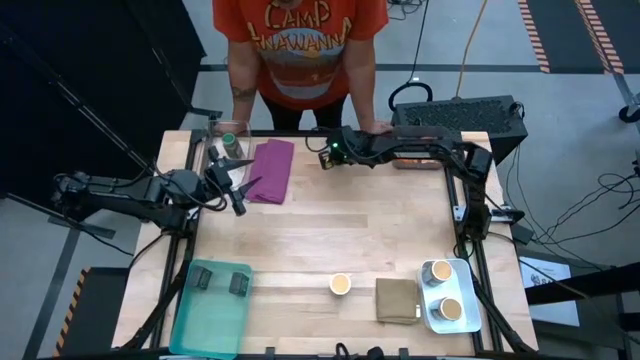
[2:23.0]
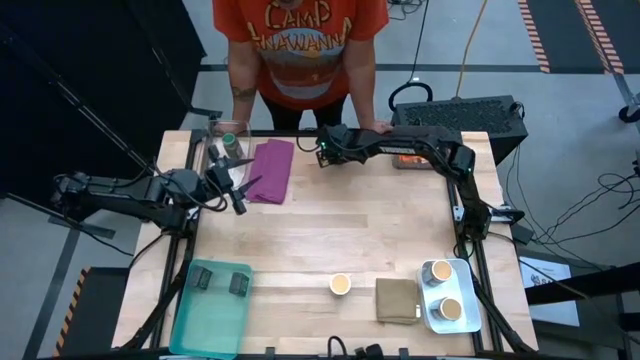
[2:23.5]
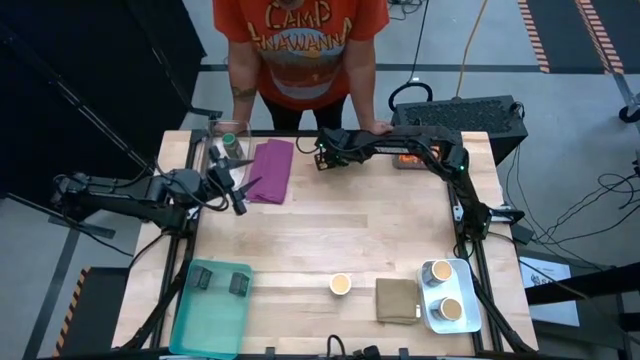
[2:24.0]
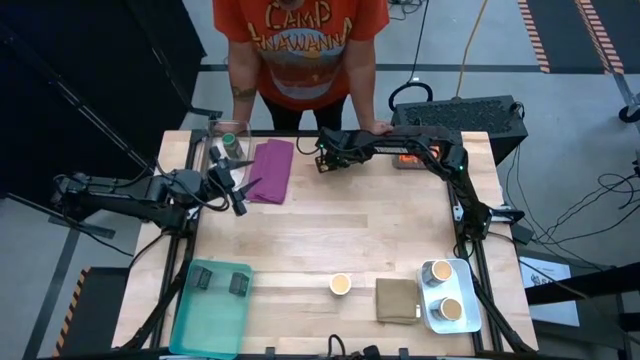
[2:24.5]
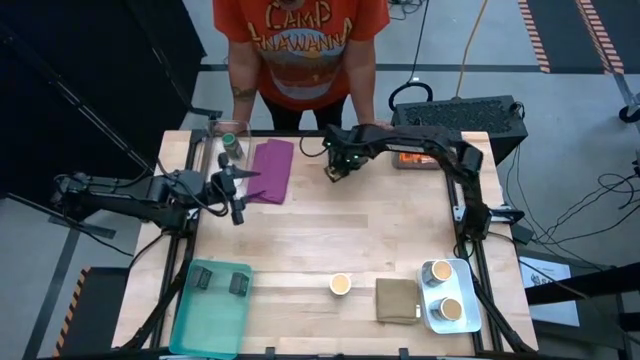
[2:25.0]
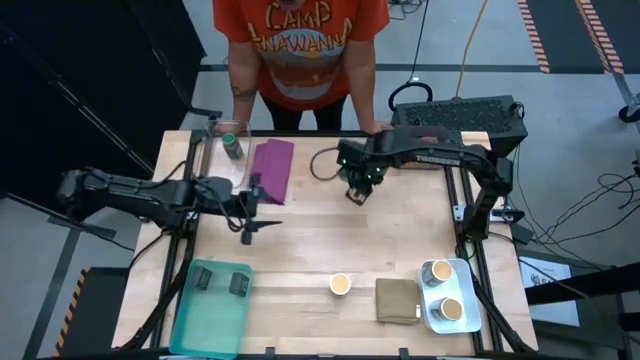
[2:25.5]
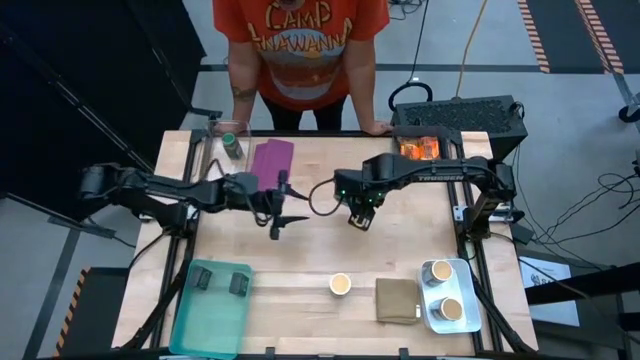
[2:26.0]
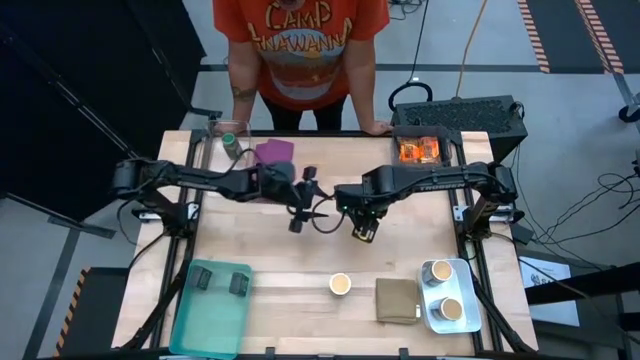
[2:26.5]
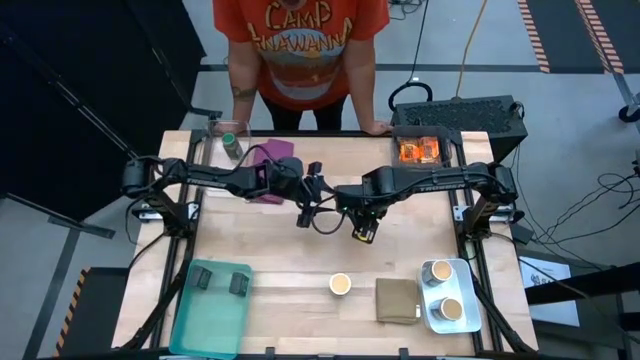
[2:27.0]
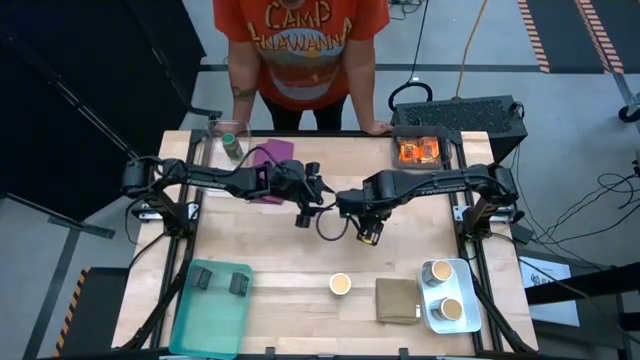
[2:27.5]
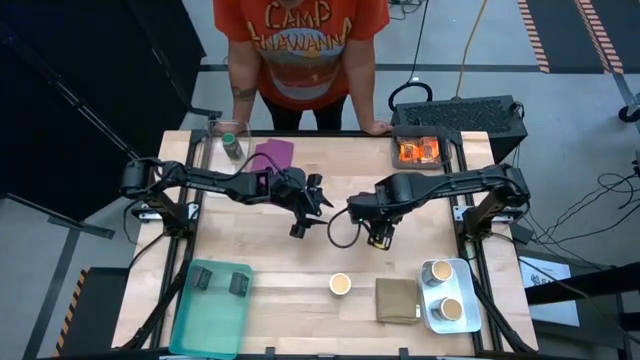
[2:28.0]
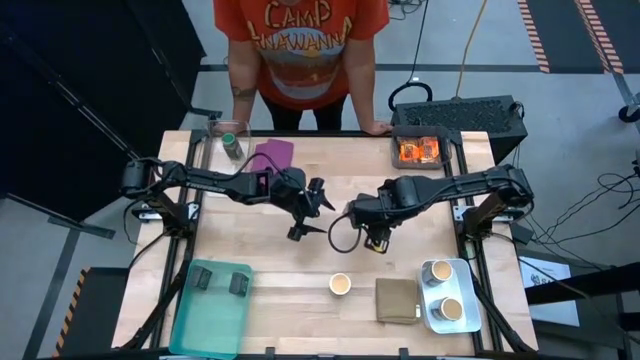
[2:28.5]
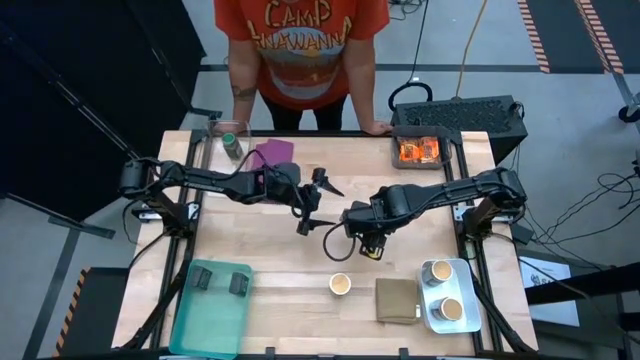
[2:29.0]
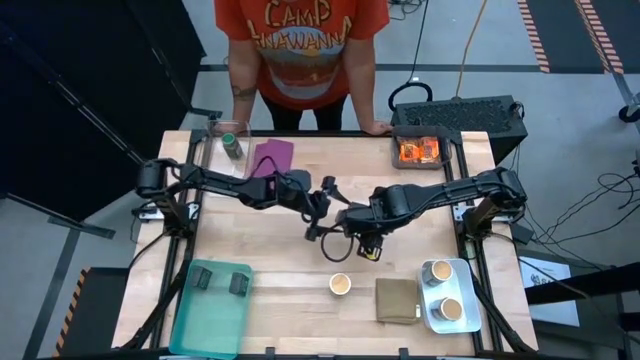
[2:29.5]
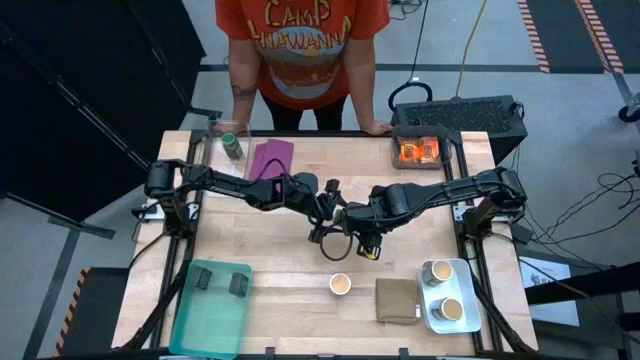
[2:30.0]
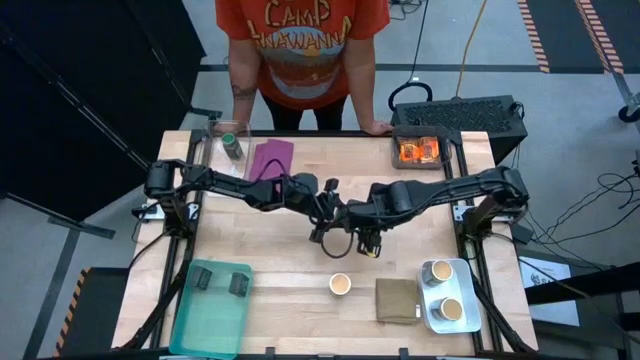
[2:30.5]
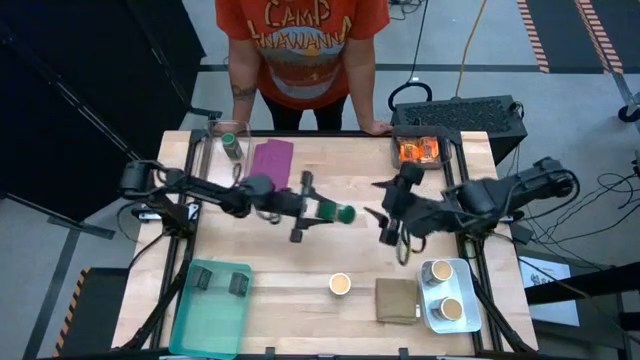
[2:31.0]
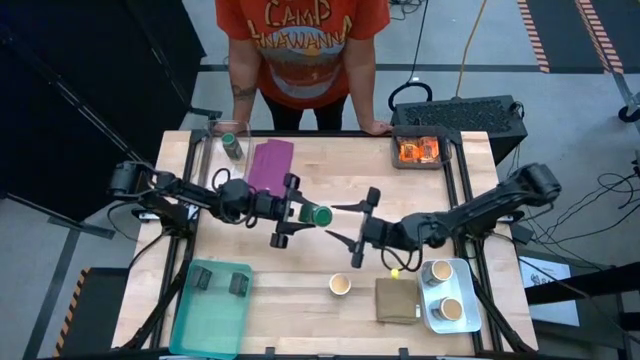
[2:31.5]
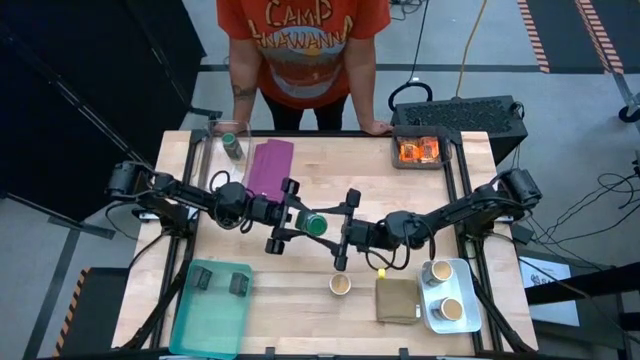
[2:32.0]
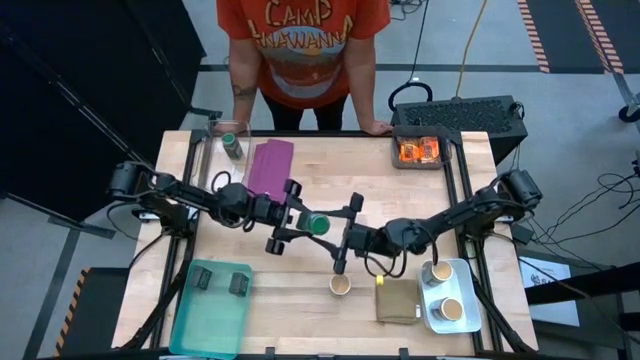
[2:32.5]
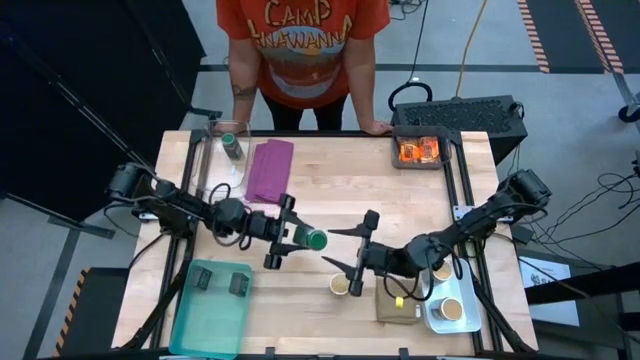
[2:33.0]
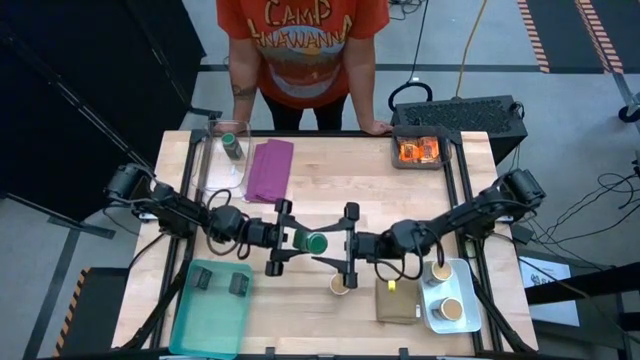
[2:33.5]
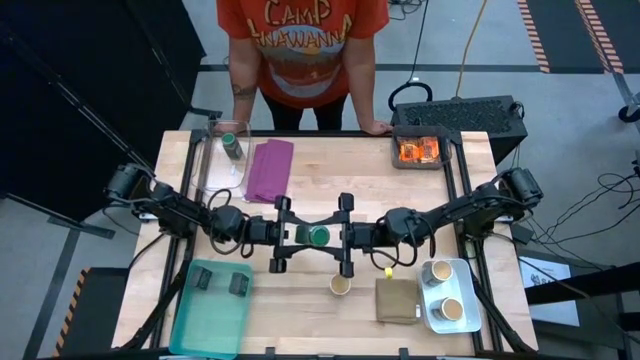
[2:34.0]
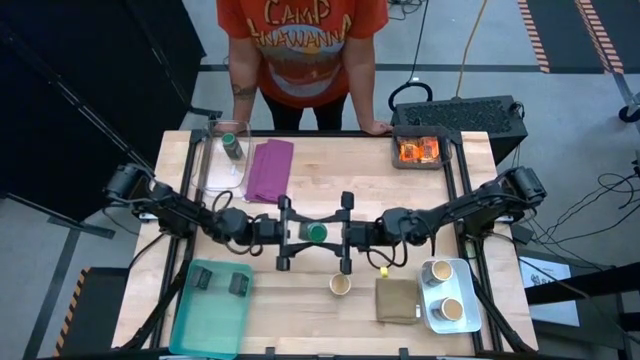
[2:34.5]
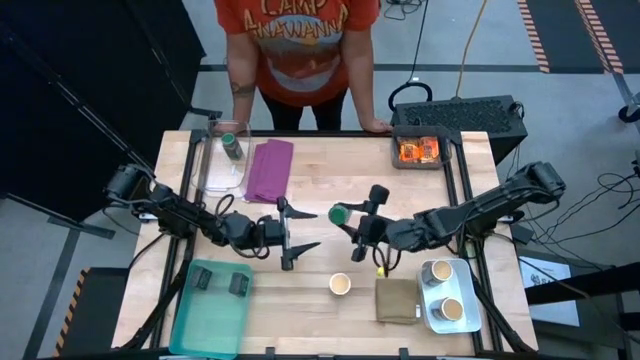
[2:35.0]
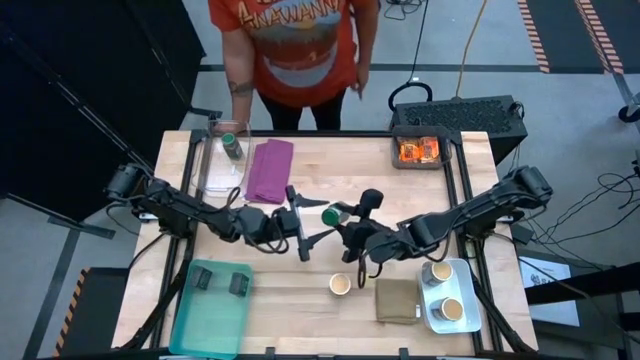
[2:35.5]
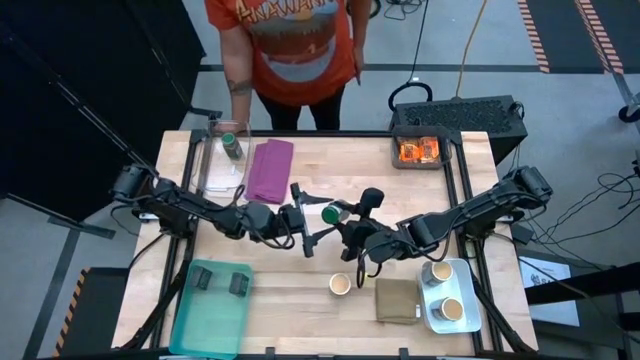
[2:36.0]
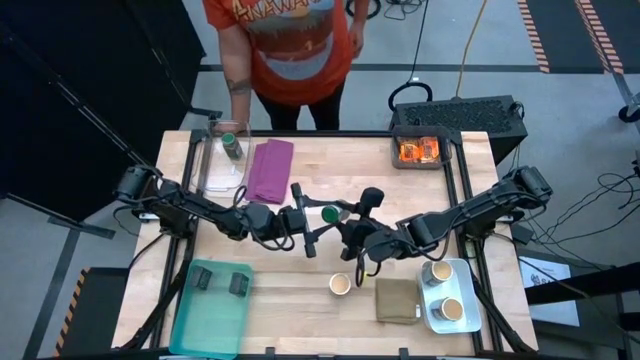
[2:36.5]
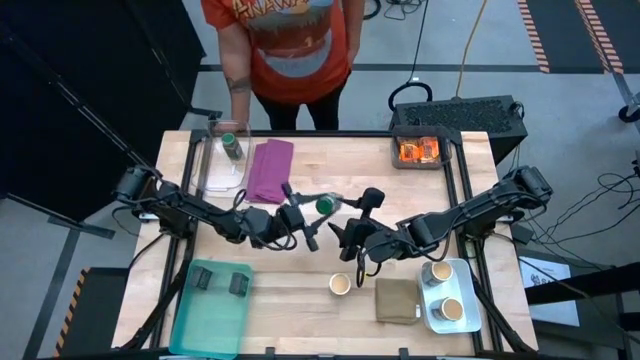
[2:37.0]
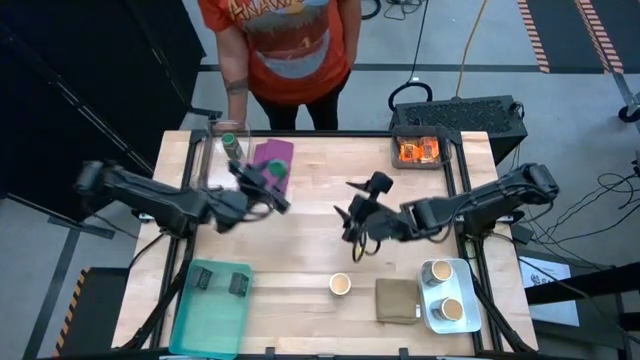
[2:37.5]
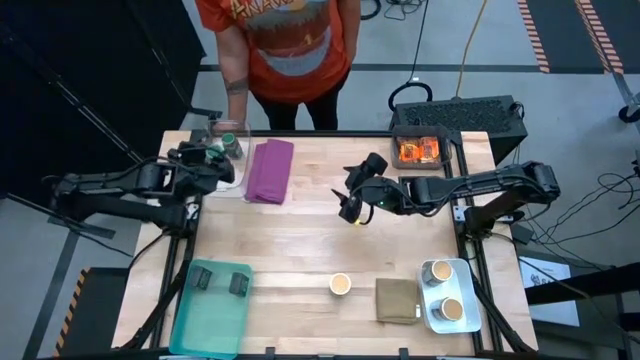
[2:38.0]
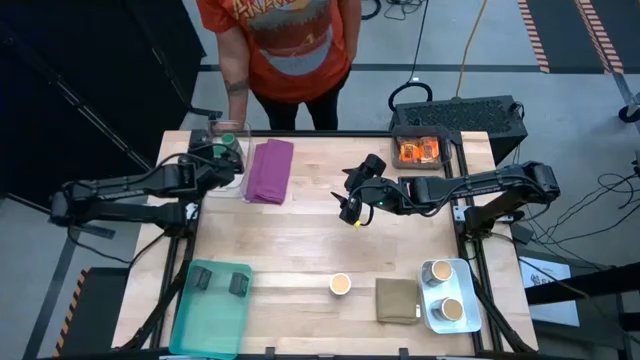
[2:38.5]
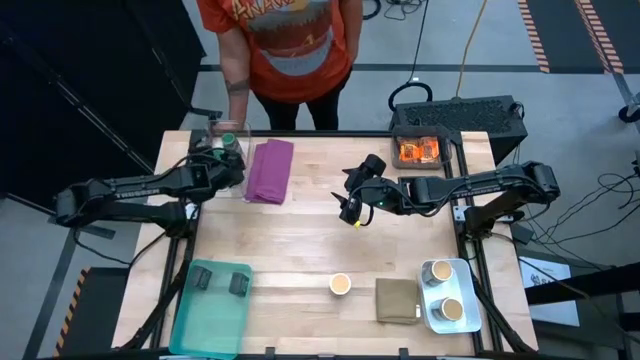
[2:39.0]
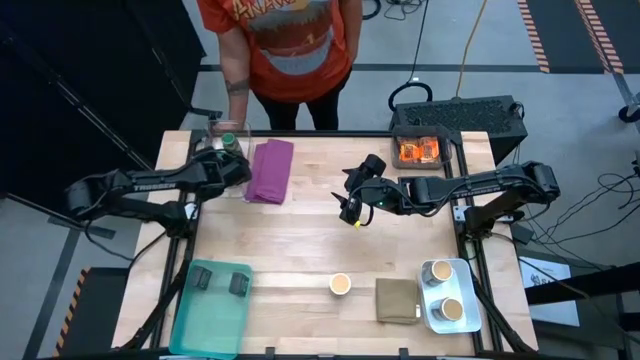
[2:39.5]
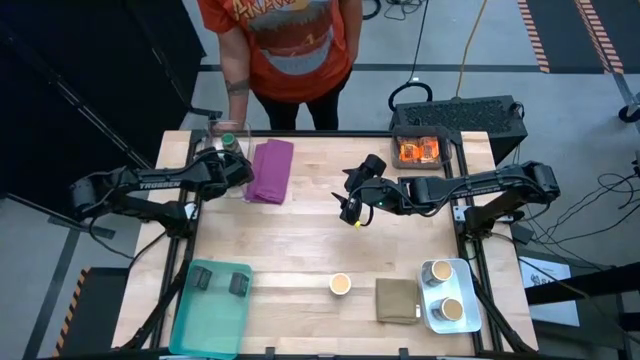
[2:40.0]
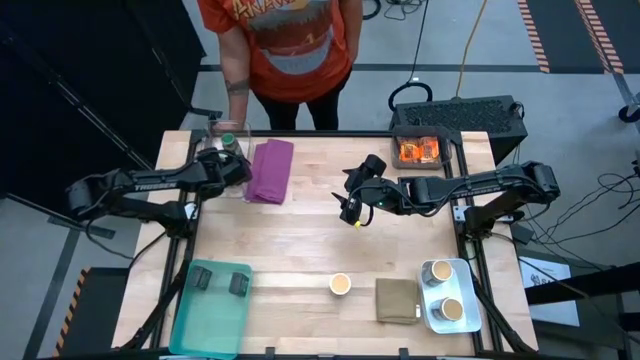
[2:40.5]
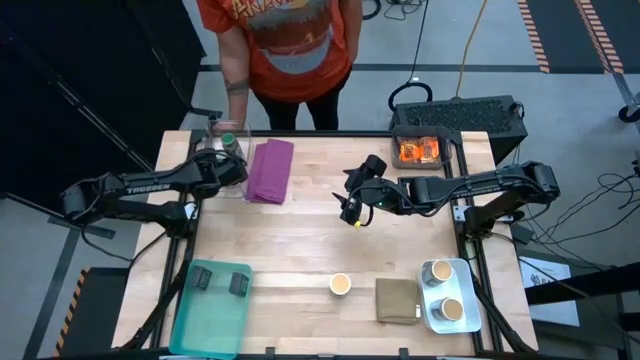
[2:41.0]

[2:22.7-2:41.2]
Task: Sort spices by type
Put the green seasoning bottle into the transparent bin

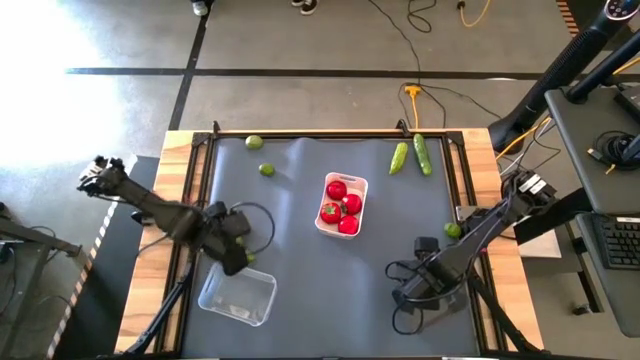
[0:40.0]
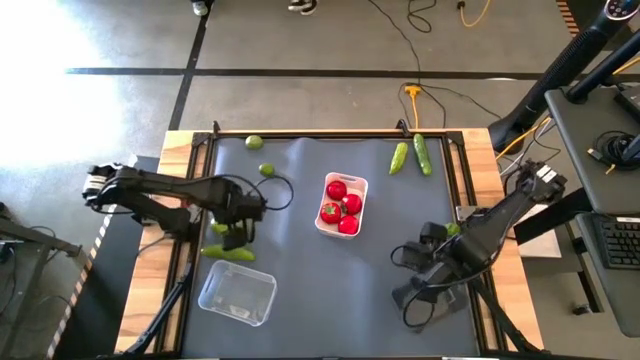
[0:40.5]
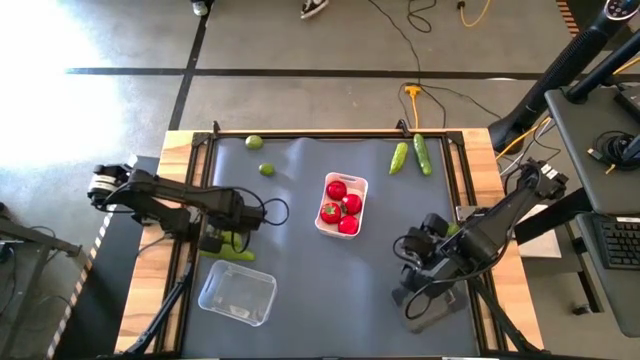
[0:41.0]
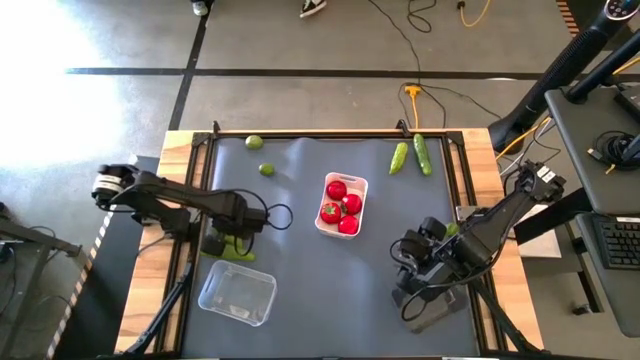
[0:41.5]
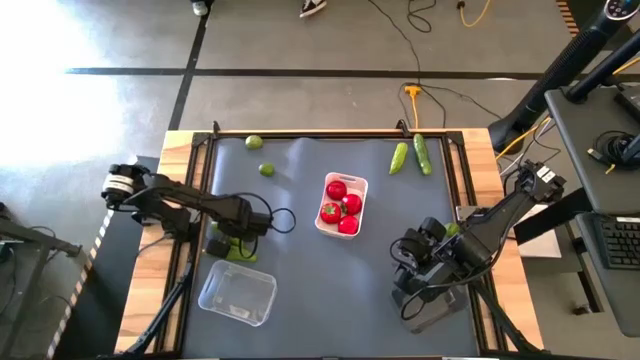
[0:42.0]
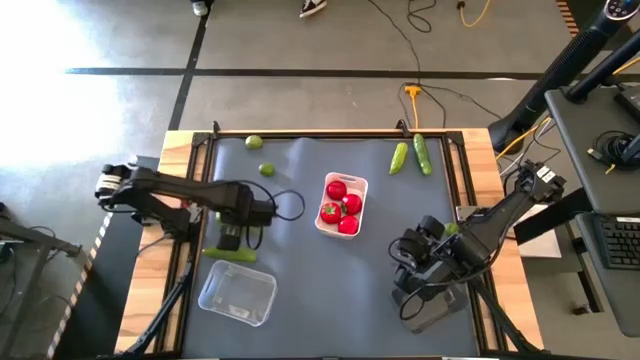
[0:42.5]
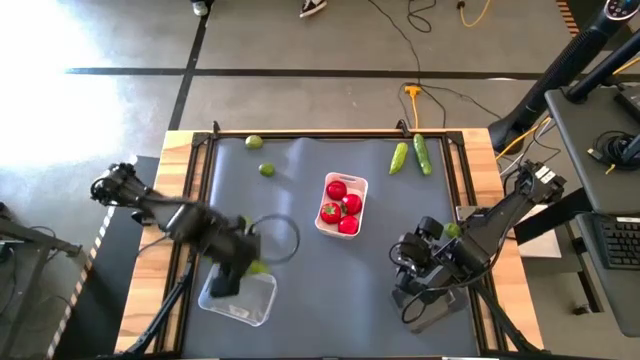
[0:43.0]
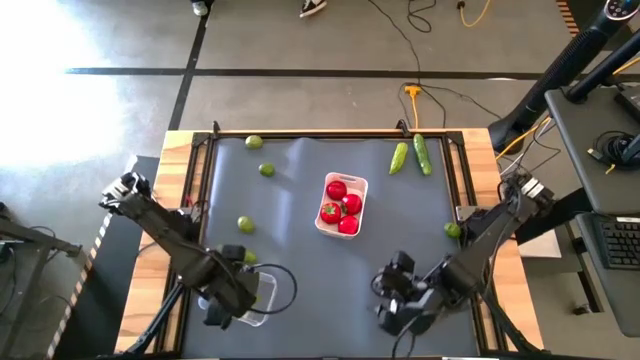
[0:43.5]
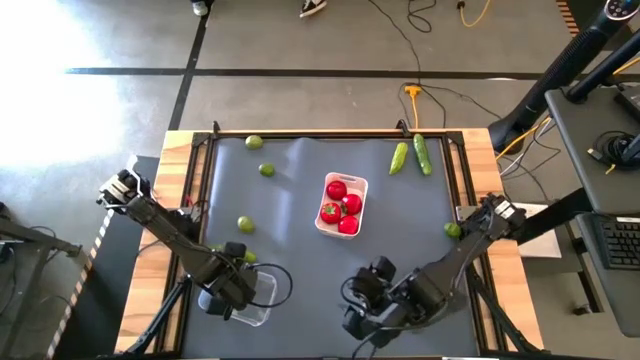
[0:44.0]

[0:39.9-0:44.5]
Task: Sort produce into baskets
Put the middle cucumber into the transparent bin
